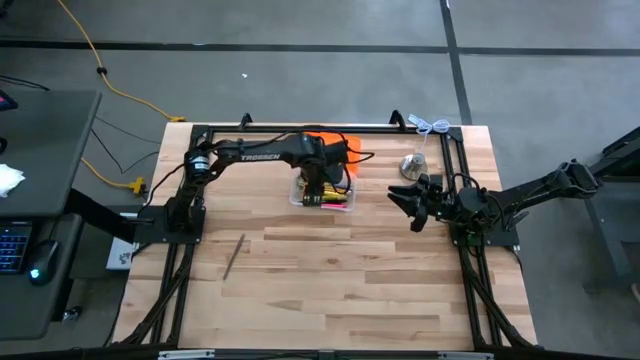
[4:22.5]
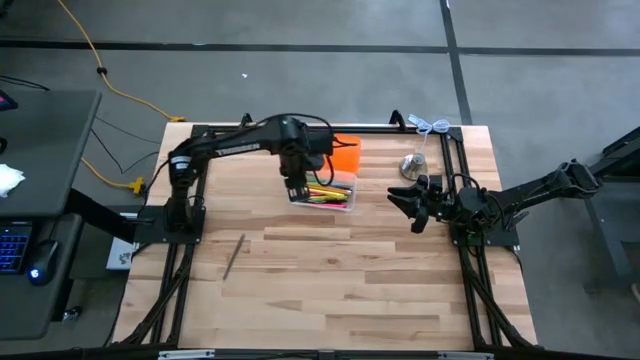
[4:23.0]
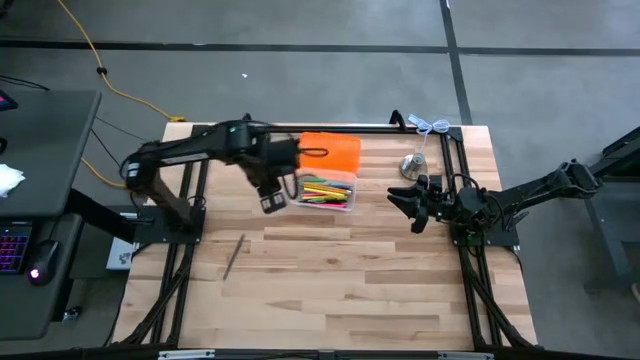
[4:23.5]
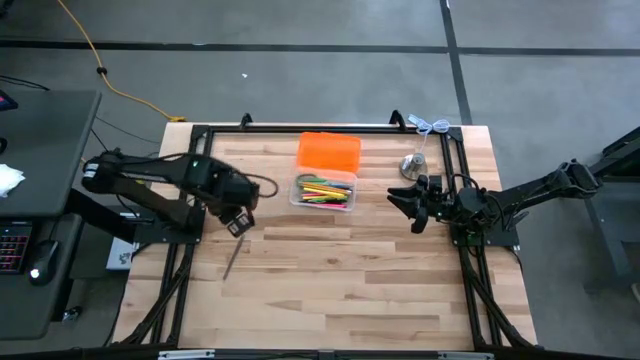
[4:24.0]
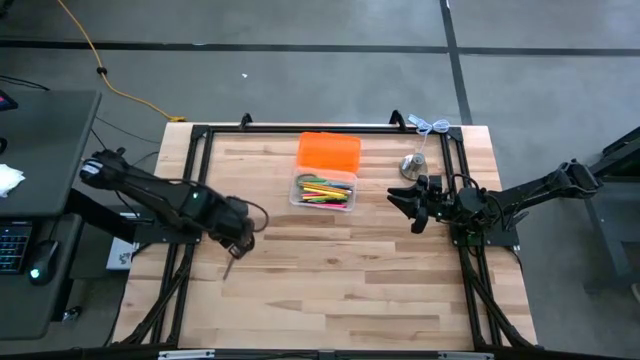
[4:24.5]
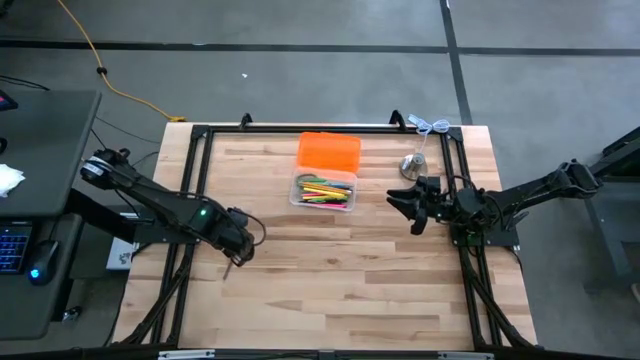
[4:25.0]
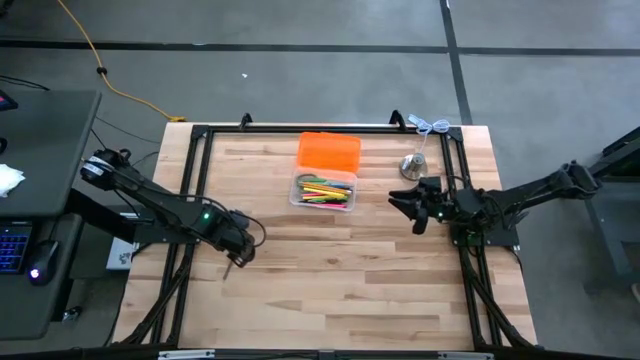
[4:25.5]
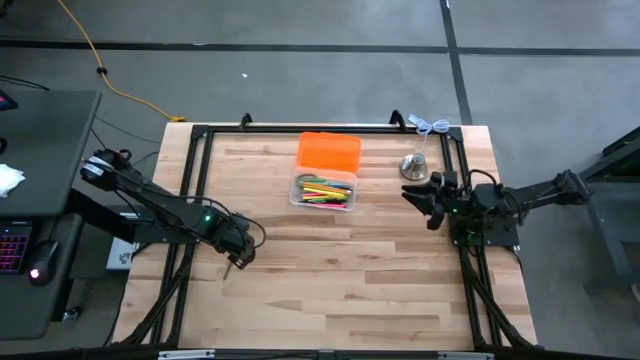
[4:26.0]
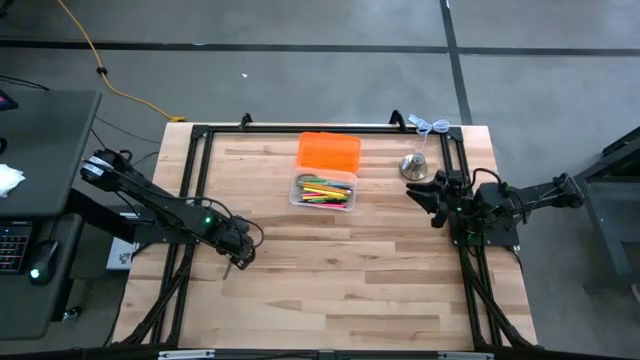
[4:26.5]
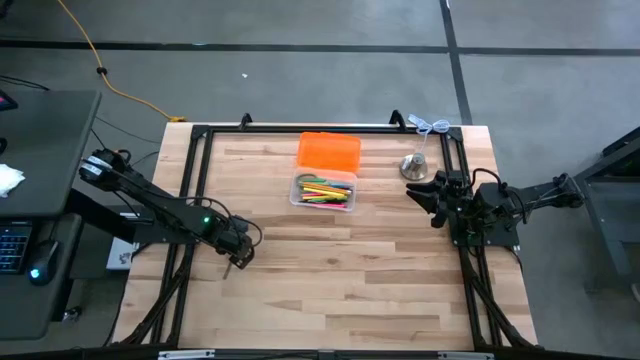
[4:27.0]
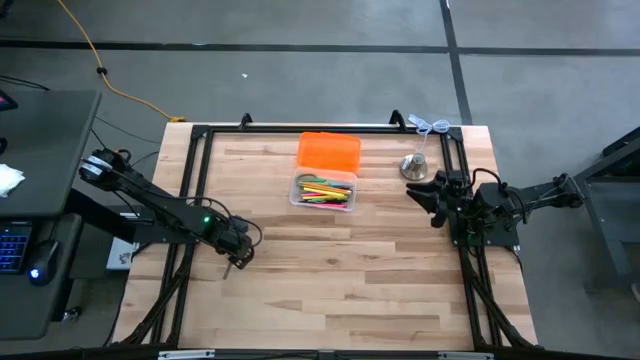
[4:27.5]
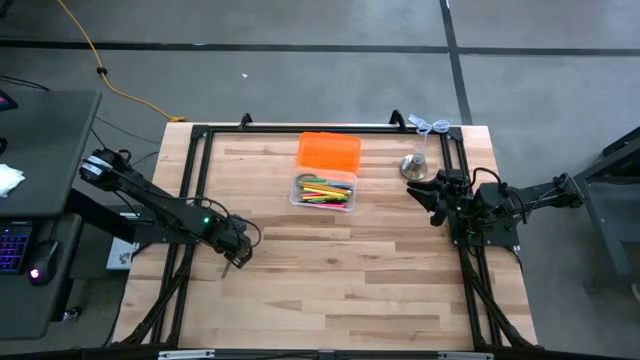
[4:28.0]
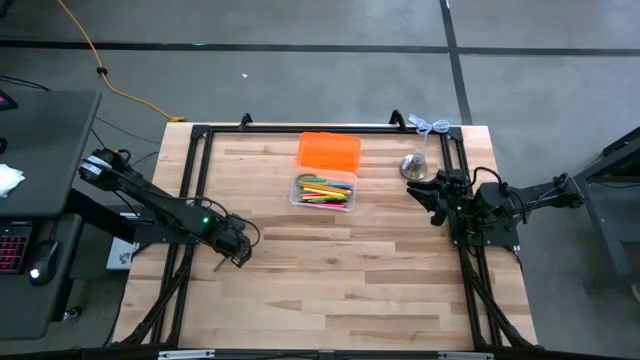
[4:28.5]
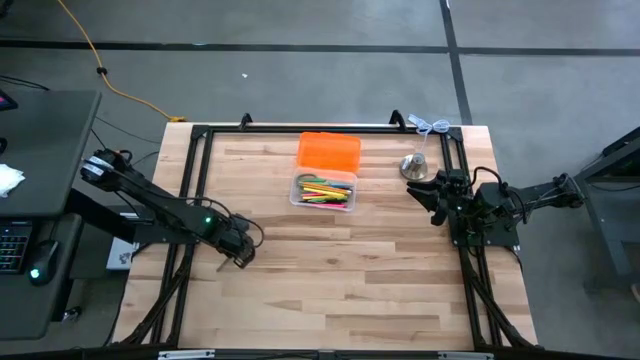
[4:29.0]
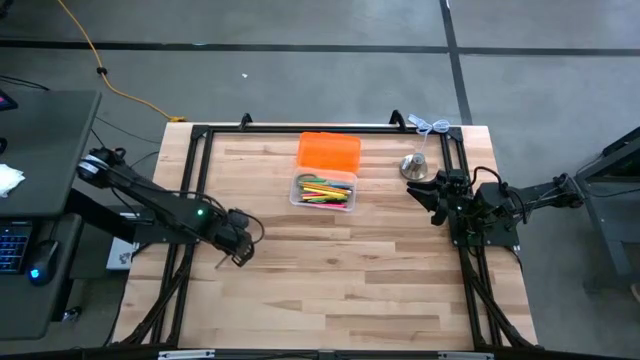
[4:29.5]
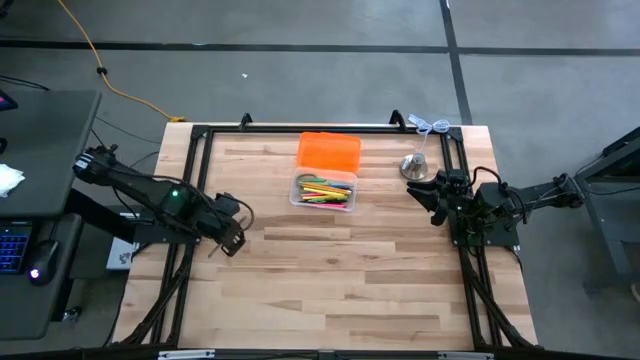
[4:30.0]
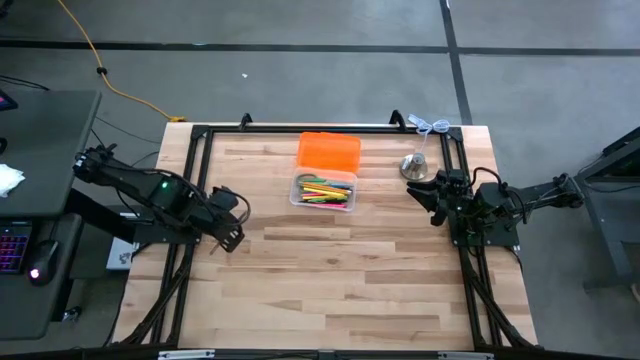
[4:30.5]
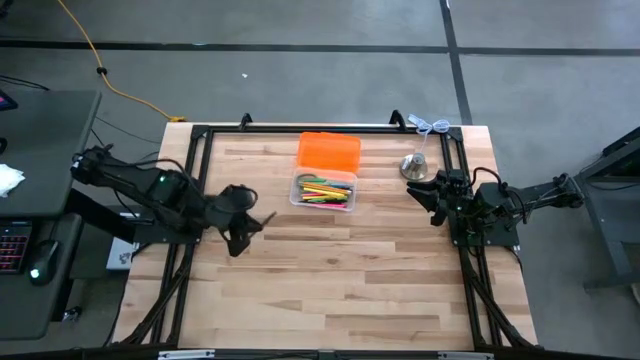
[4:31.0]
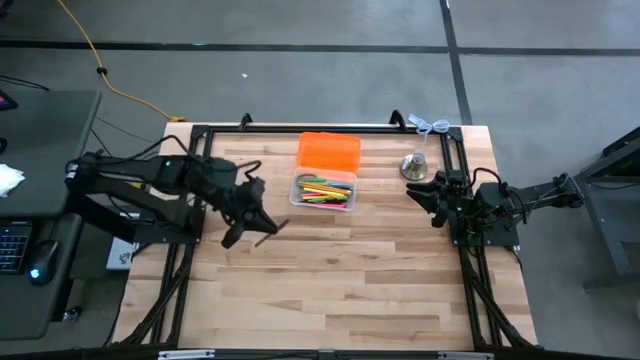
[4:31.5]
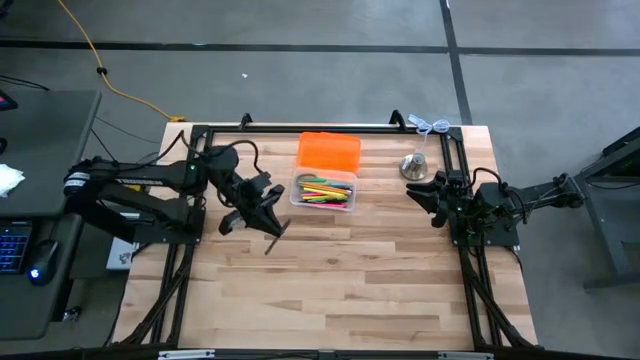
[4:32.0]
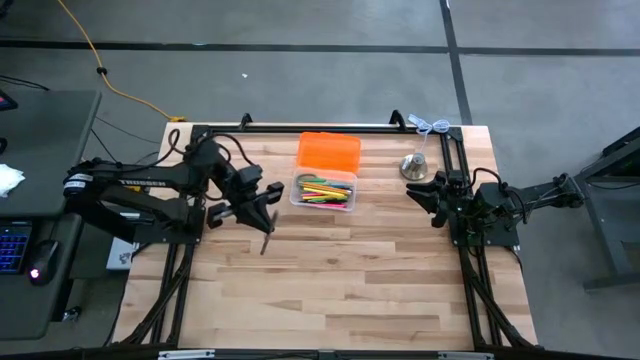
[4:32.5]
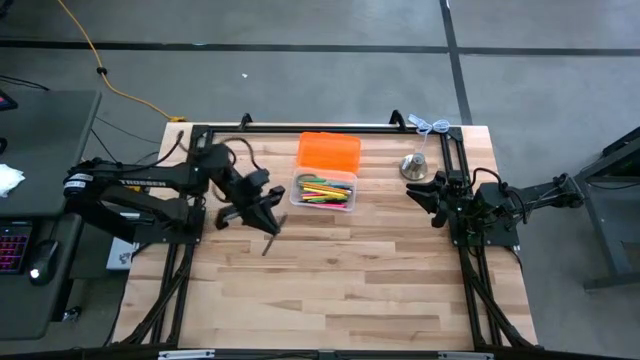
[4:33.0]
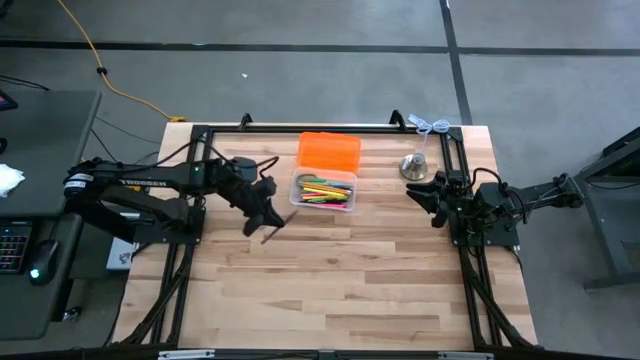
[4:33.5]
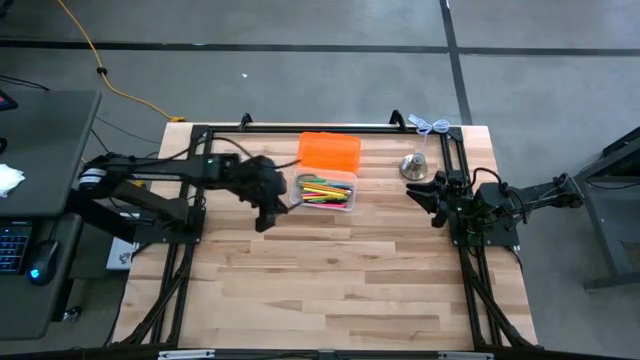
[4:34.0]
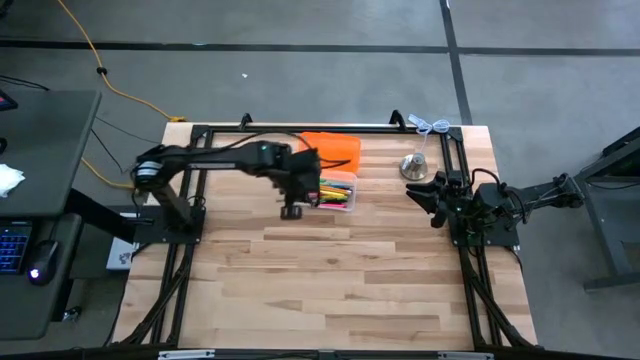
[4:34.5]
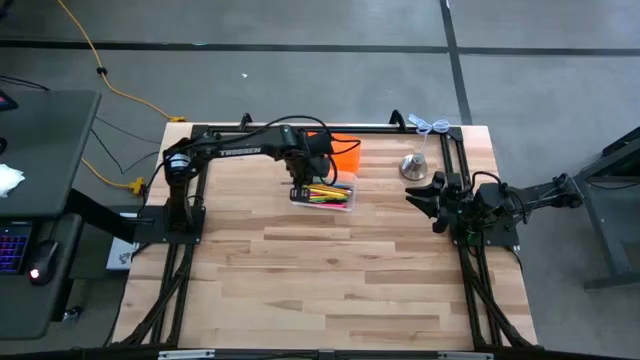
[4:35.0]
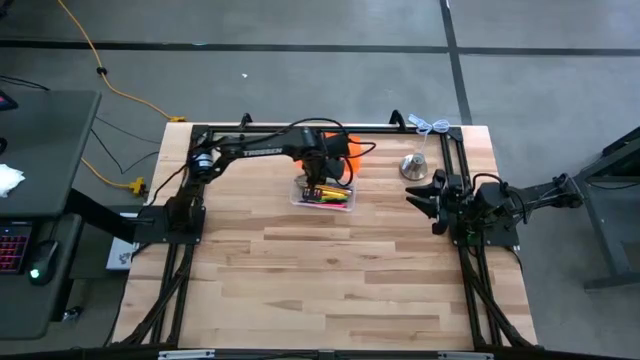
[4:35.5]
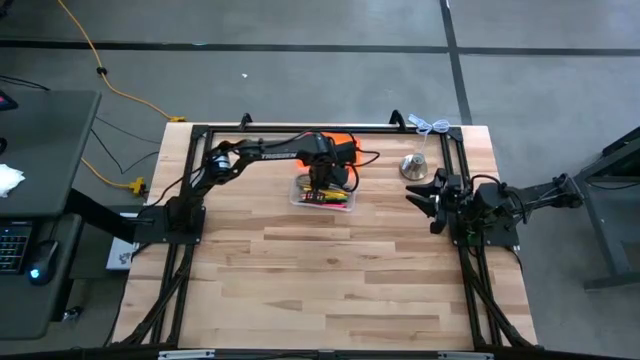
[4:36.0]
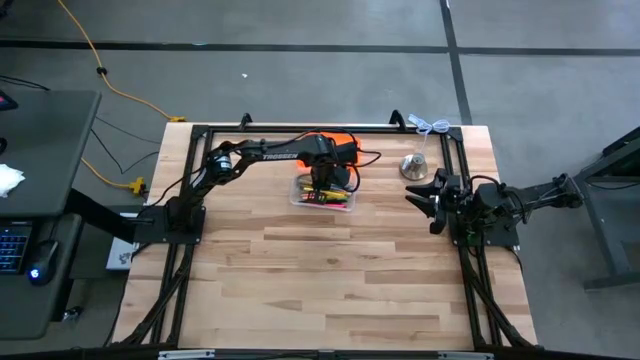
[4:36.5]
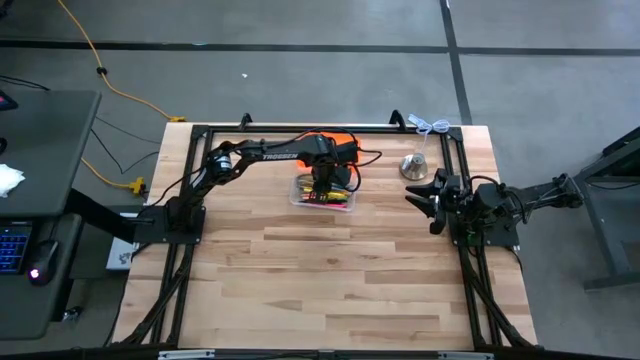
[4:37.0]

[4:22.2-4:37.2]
Task: Pick & place school supplies into a supply box
Put the gray pen into the transparent supply box

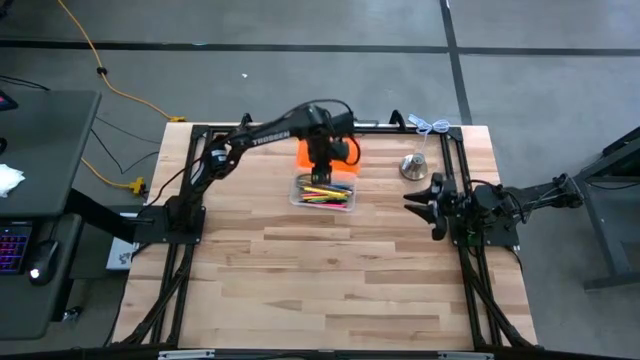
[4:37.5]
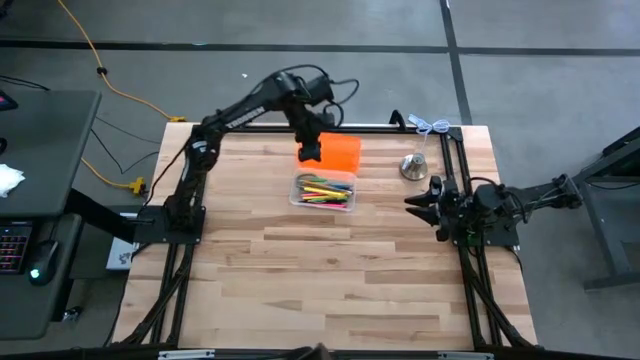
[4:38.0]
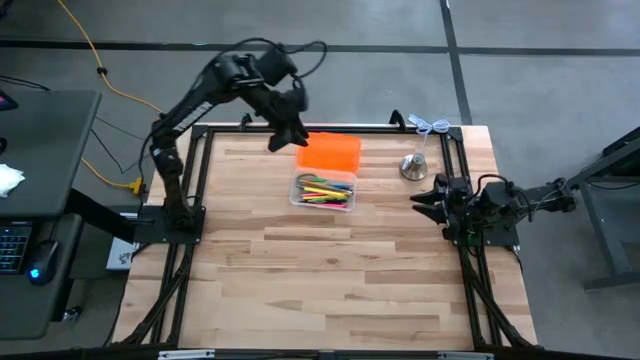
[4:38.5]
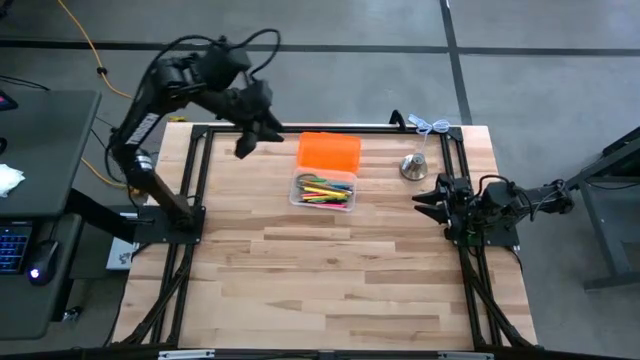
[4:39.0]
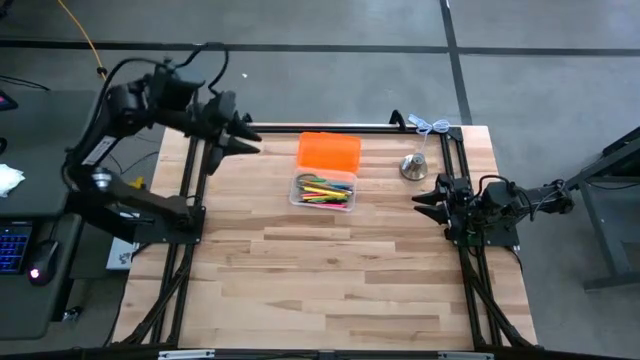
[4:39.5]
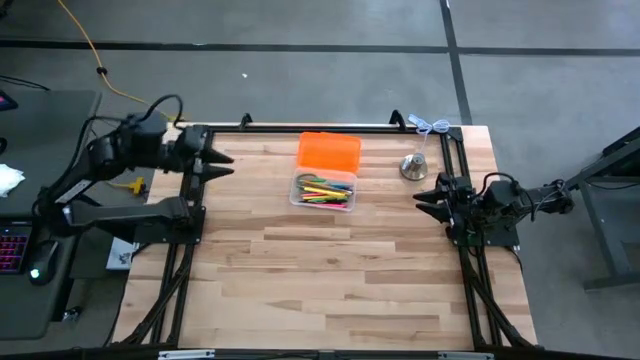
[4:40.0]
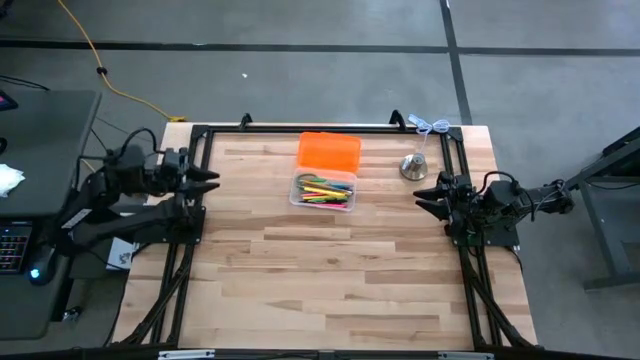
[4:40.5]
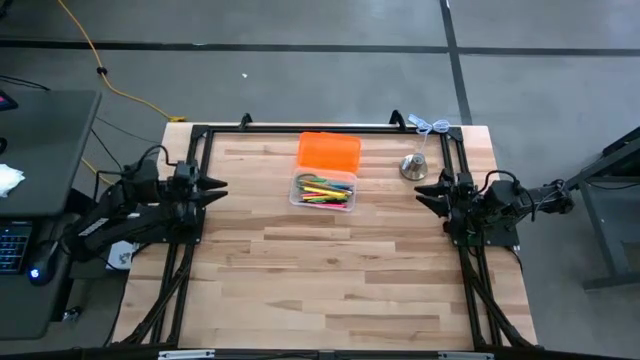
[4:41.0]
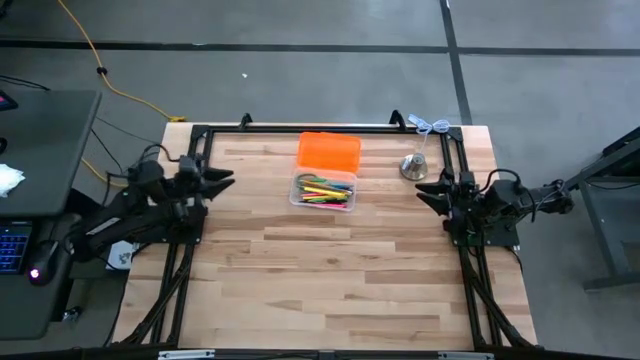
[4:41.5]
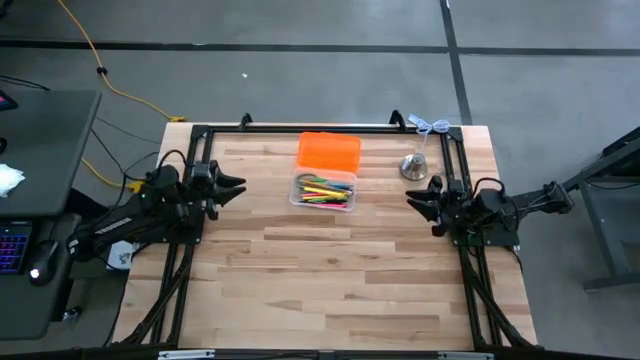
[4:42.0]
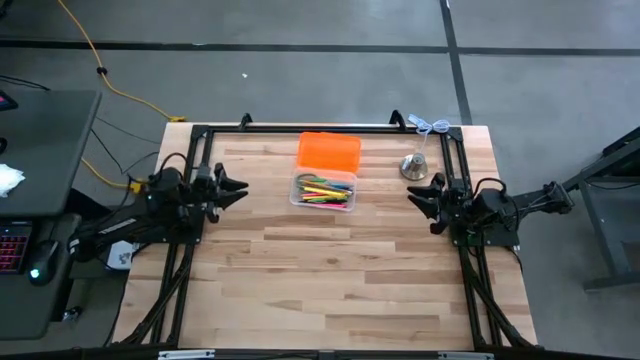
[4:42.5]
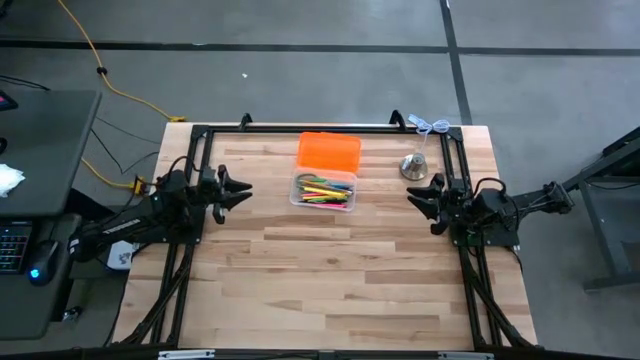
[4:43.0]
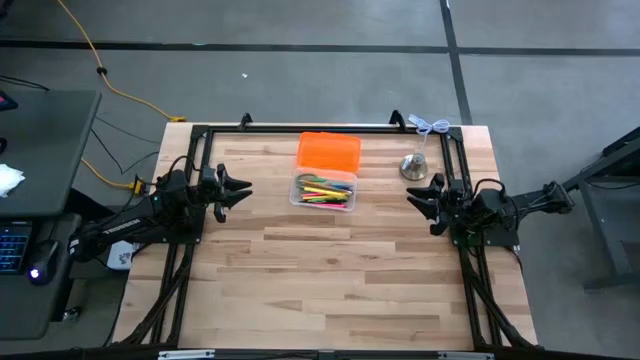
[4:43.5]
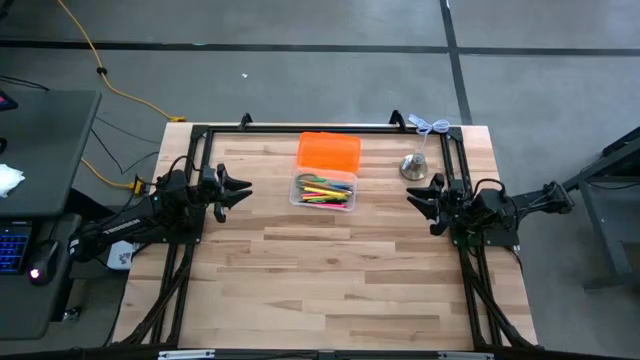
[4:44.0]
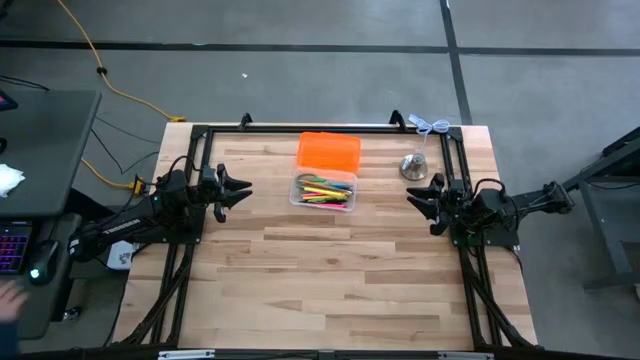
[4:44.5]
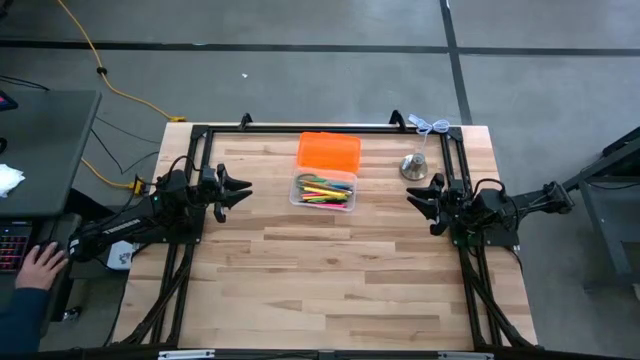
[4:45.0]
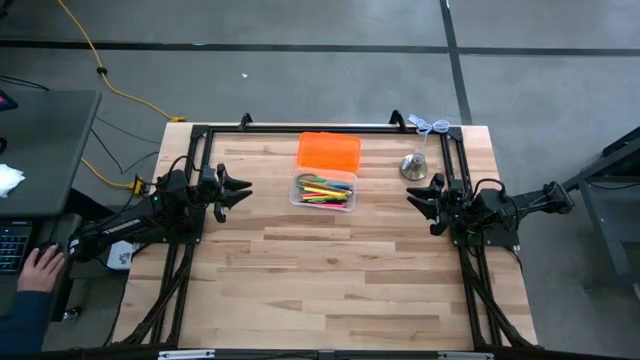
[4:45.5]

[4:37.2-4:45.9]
Return to Home Position
